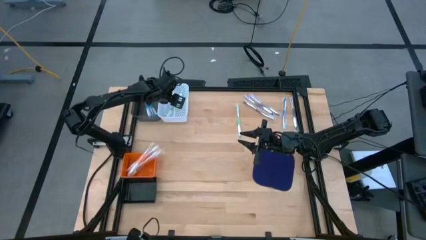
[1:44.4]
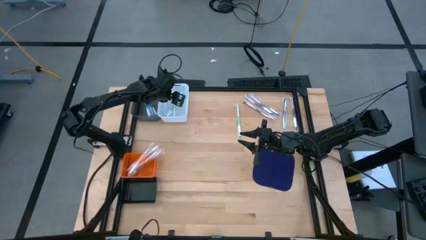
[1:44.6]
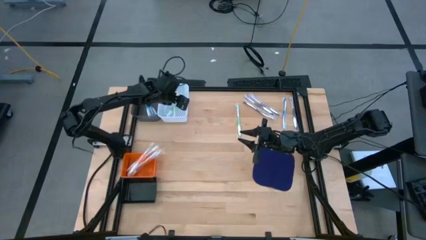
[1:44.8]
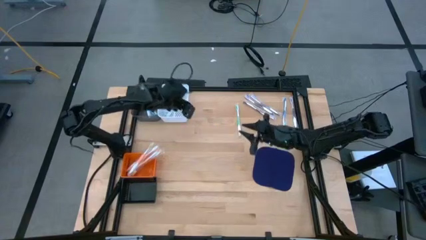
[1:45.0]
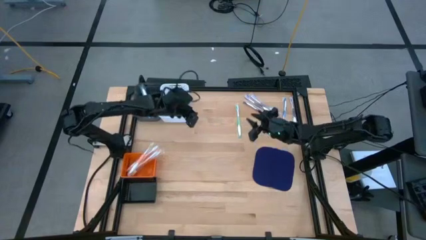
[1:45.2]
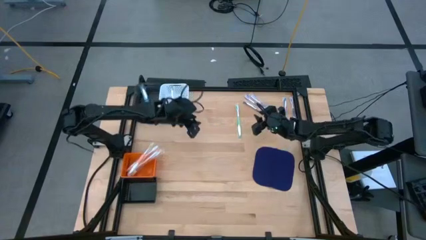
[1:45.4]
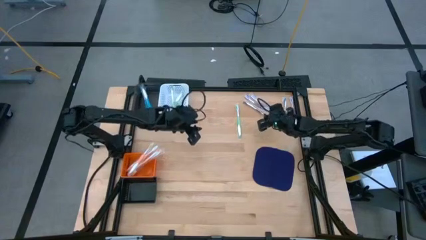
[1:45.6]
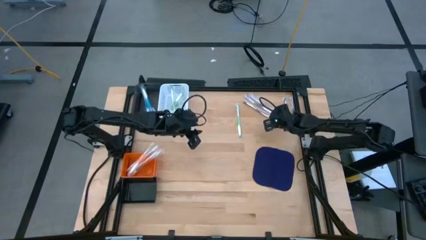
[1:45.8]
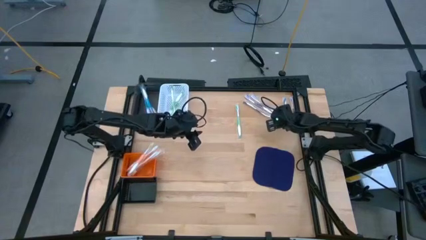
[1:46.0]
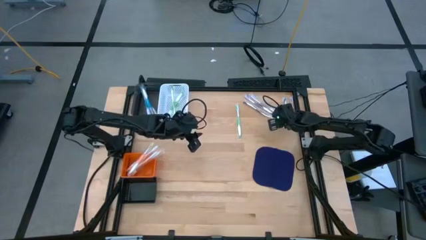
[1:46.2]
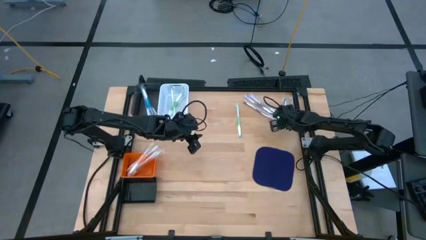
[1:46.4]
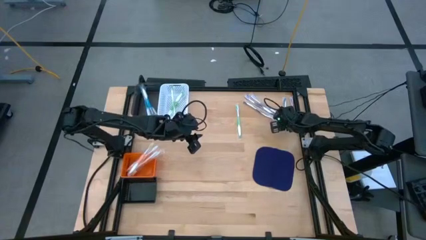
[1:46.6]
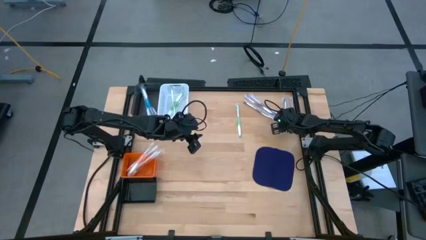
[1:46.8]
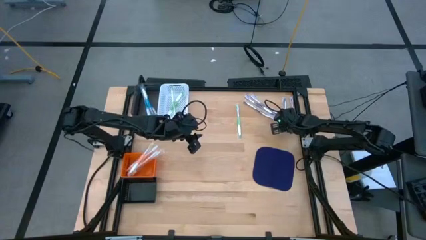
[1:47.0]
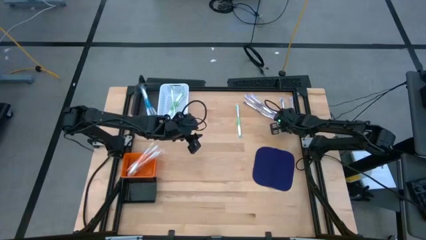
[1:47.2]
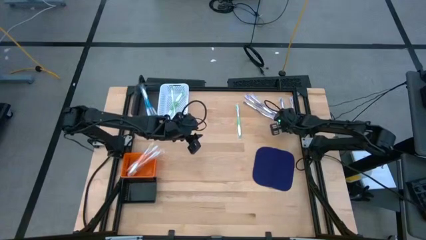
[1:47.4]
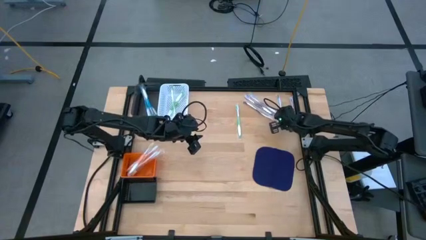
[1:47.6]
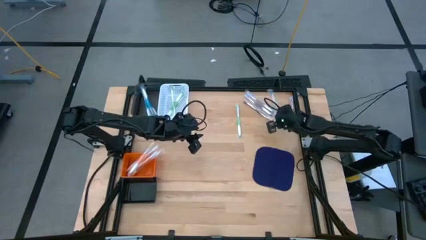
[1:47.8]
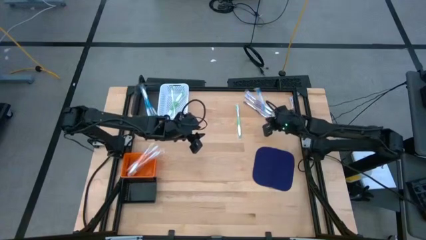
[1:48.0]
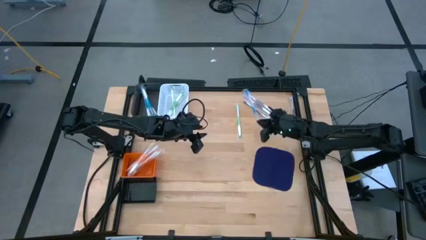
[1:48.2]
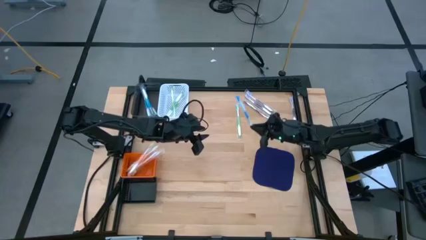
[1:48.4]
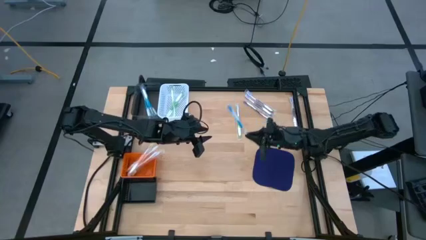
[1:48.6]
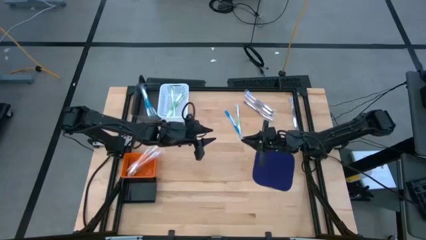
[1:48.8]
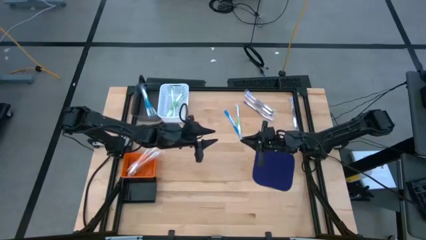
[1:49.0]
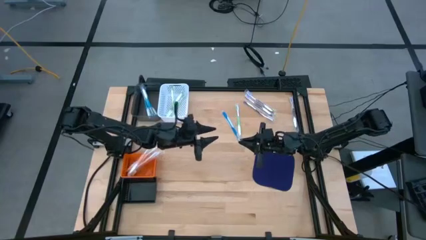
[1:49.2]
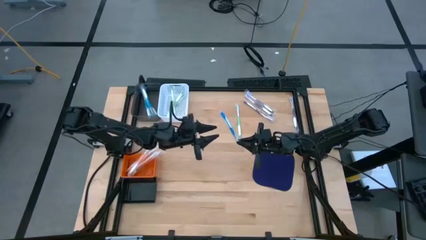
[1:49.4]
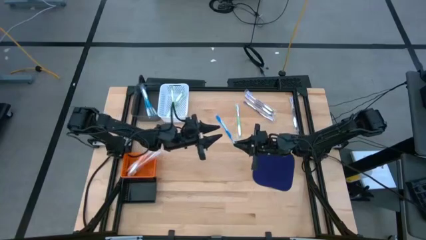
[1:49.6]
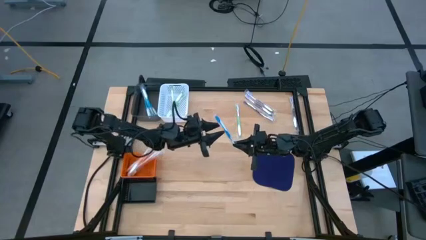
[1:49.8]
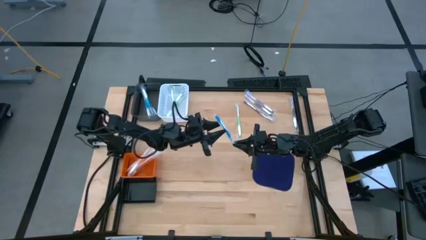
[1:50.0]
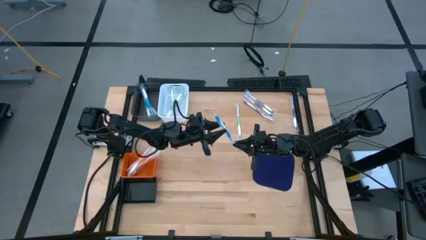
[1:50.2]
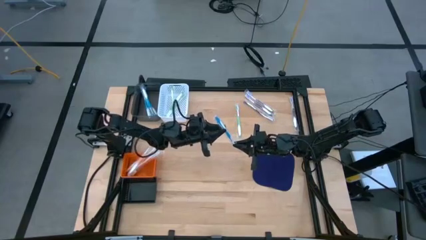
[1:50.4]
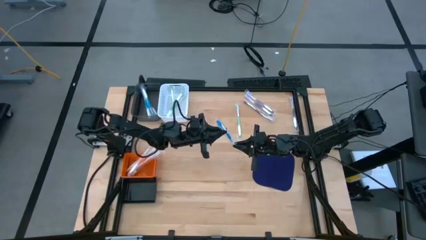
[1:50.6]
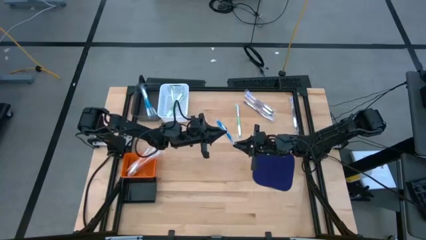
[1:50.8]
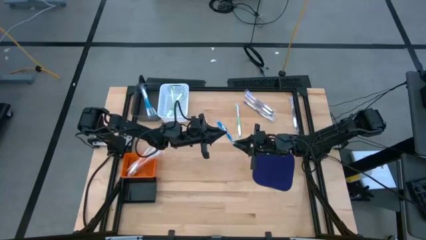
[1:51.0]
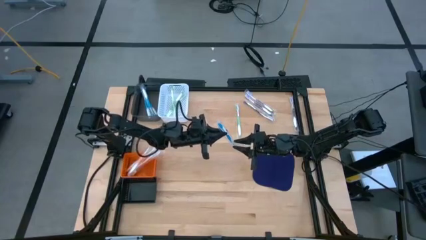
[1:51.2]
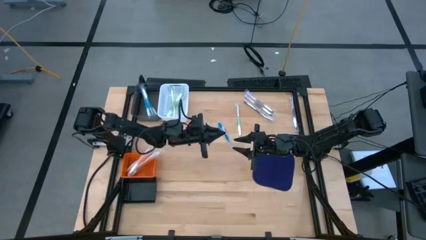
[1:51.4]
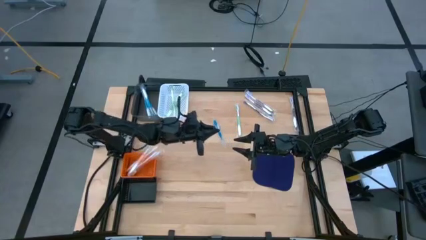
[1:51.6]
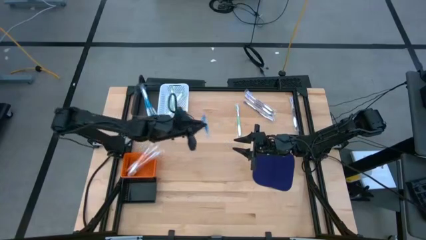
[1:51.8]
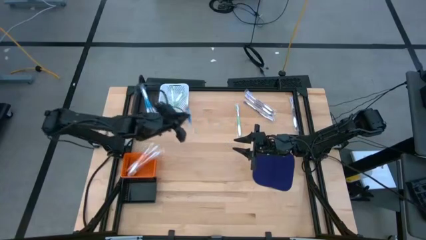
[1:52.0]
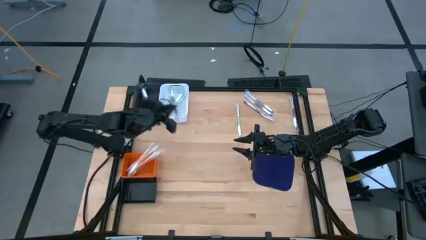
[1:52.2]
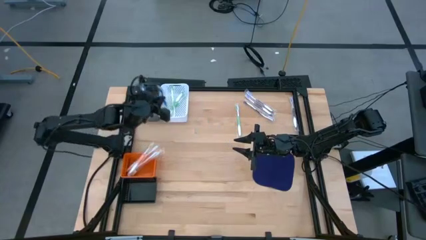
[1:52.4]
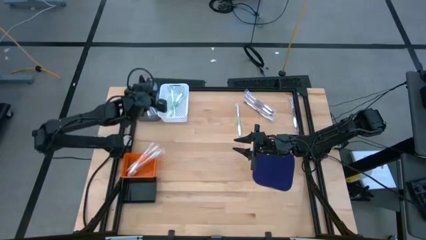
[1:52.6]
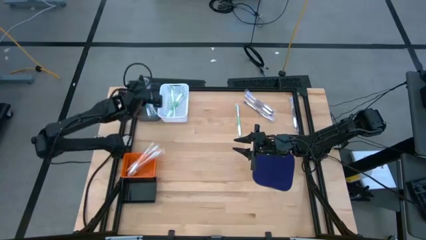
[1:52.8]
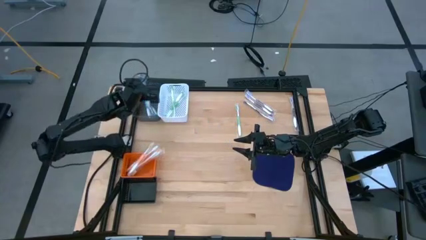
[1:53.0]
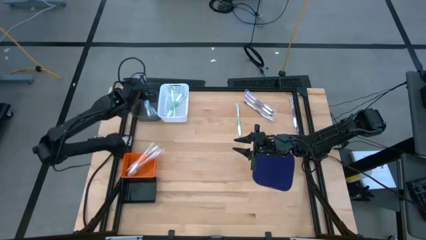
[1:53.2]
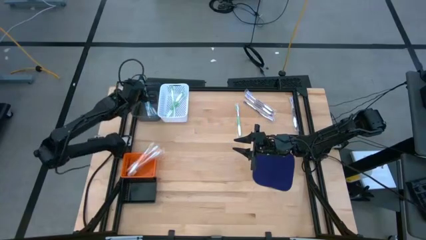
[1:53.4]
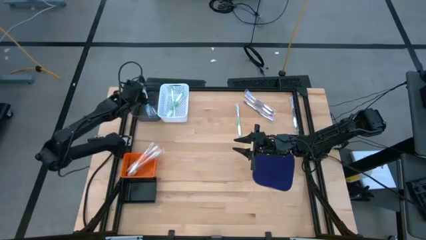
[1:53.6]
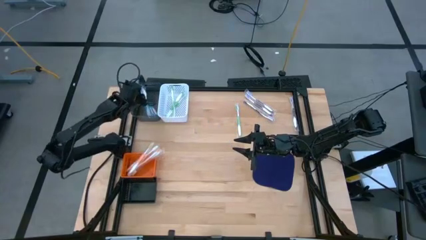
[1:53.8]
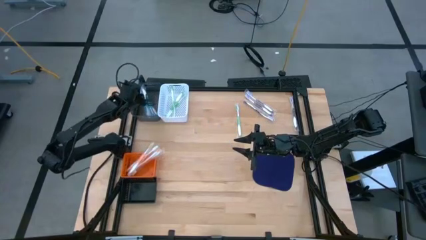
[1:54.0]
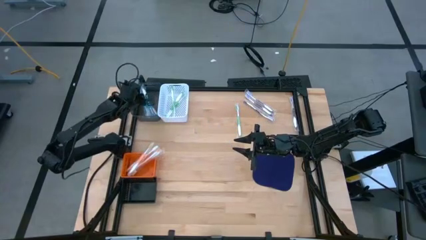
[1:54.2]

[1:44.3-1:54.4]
Task: Pick & Place Toothbrushes
Put the blue toothbrush into the gray bin

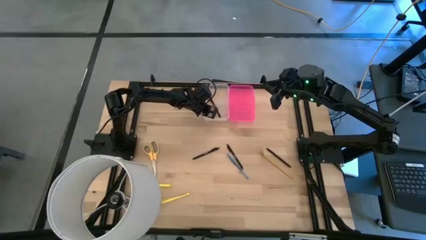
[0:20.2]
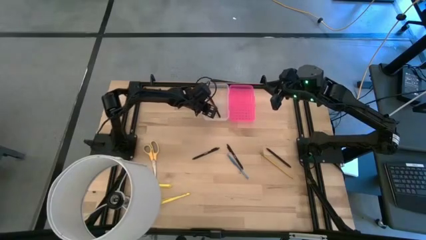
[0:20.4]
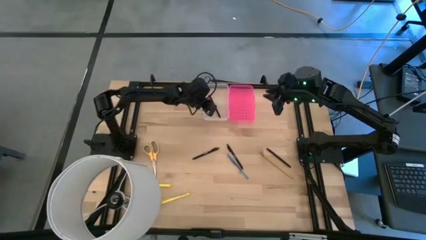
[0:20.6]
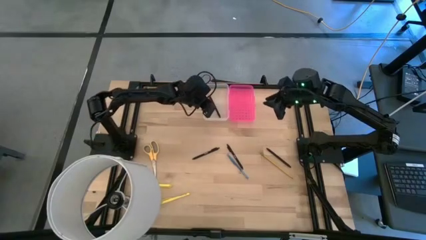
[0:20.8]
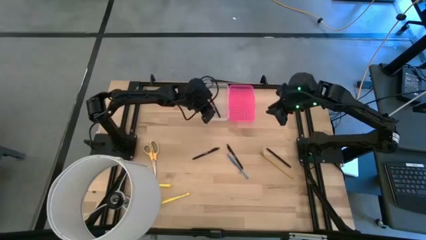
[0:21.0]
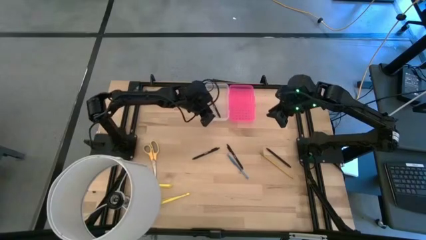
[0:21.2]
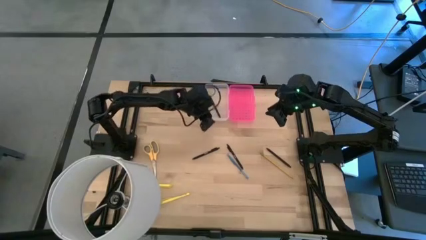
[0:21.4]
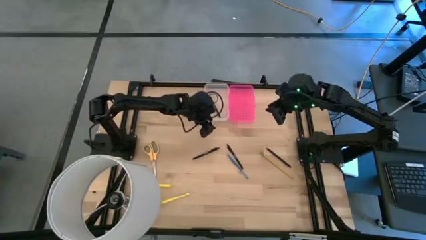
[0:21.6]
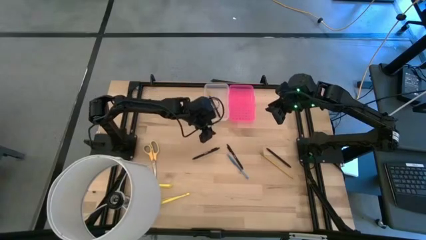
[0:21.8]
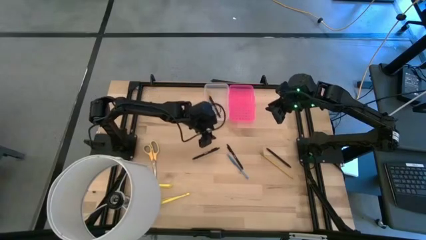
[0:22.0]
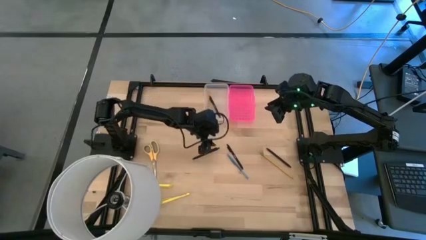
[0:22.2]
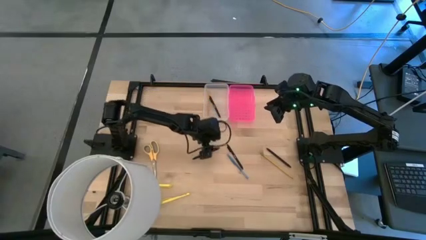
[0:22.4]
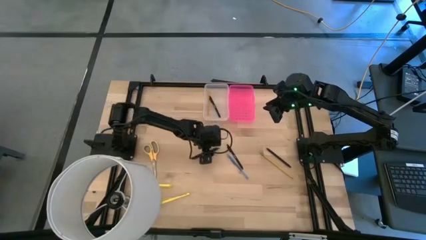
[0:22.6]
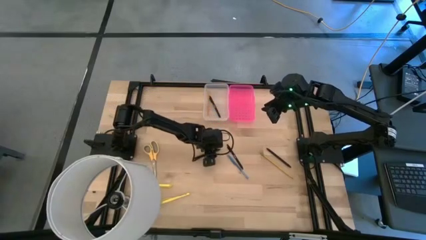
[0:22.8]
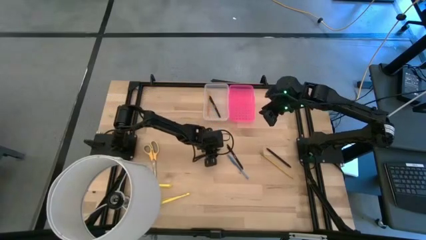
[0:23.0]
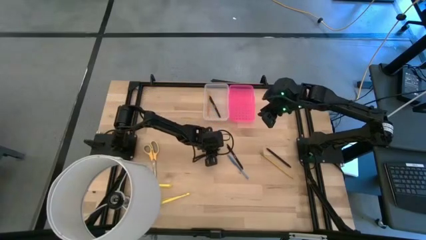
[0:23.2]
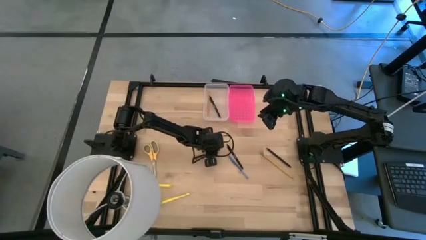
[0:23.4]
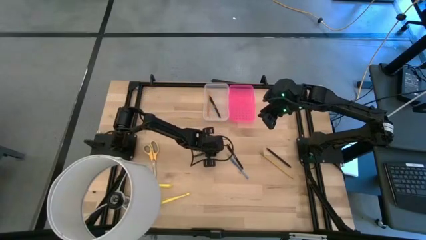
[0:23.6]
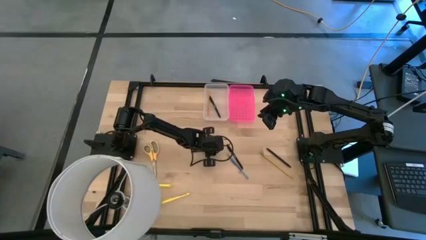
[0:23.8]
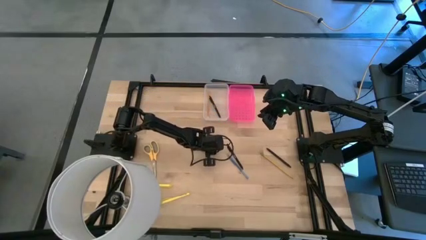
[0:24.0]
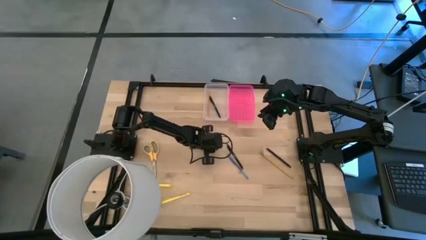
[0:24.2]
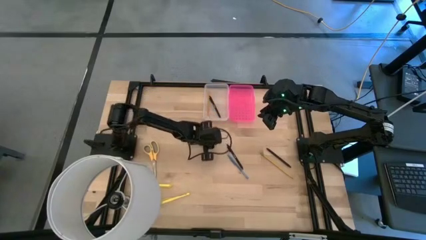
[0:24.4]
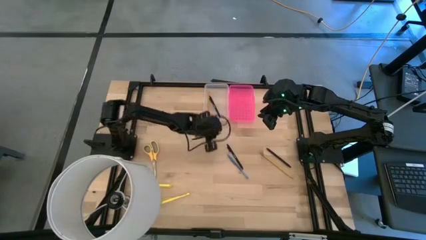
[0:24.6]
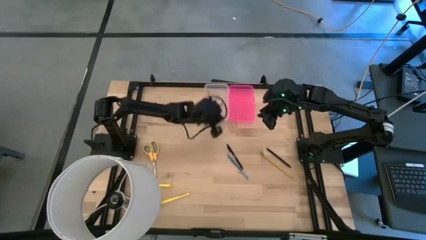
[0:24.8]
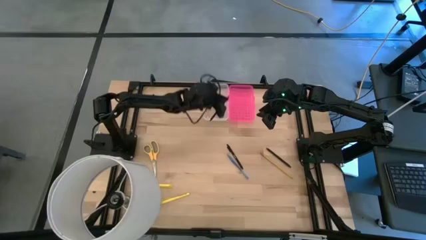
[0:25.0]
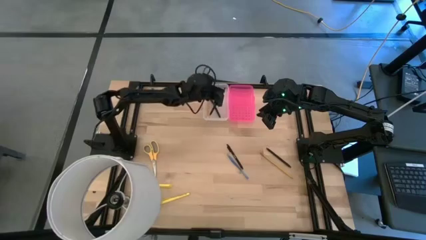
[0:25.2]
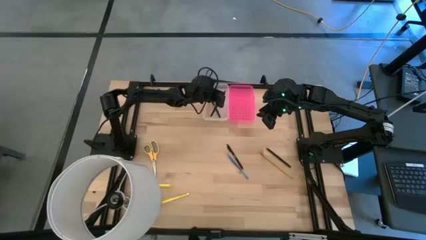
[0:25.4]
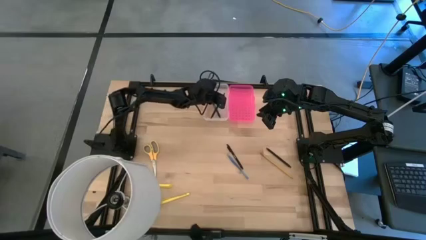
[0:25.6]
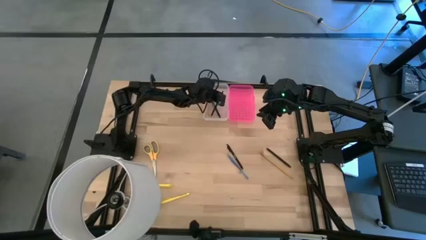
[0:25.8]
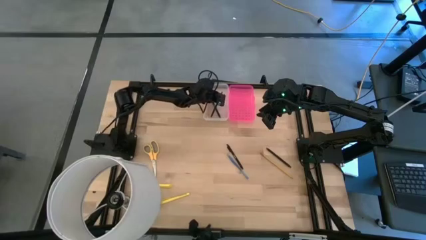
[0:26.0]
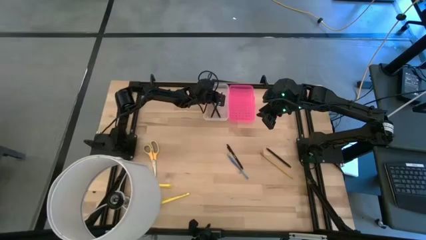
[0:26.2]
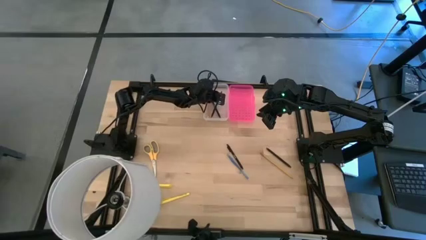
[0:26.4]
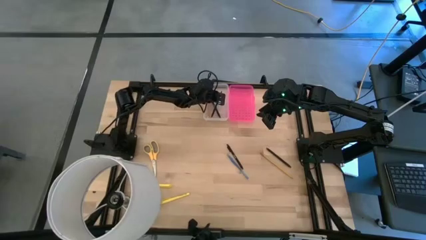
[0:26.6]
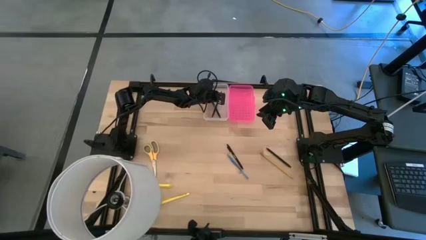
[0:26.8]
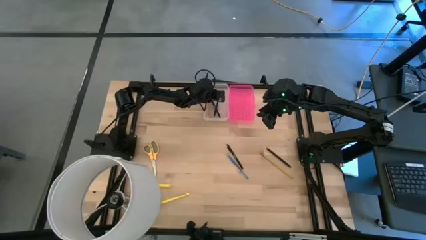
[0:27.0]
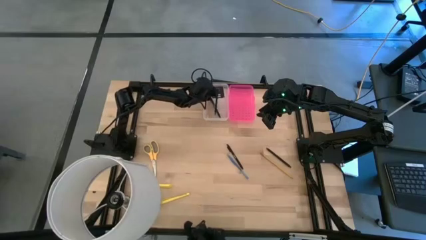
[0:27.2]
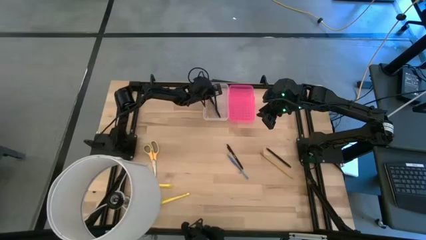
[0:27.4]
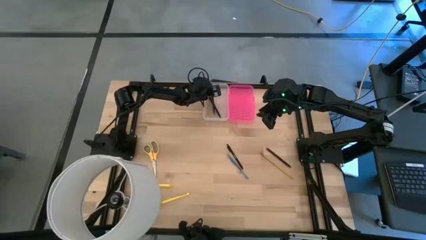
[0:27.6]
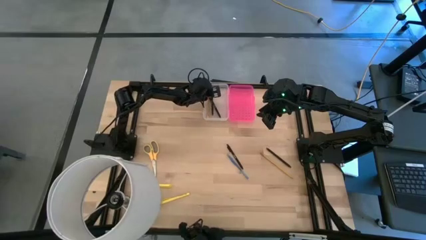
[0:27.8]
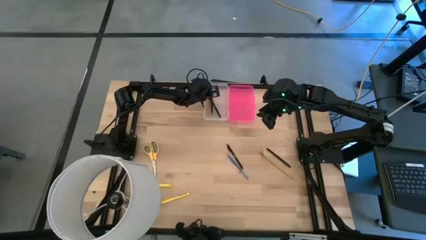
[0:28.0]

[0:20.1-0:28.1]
Task: Pick & place school supplies into a supply box
Put the black pen into the transparent supply box
